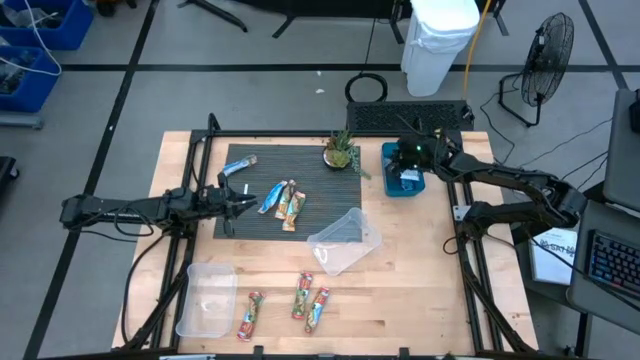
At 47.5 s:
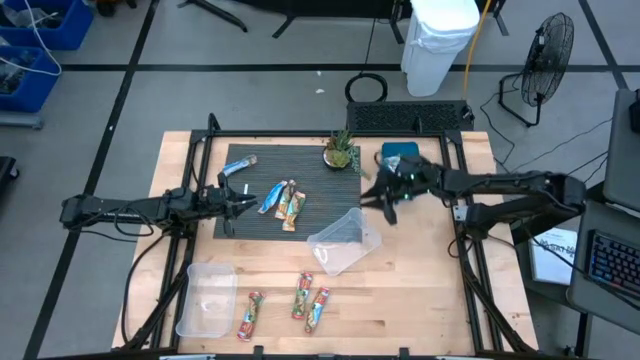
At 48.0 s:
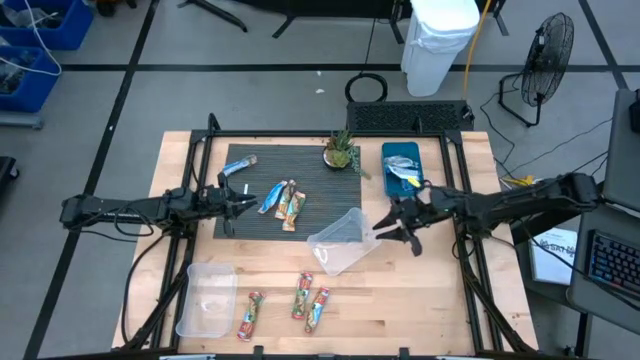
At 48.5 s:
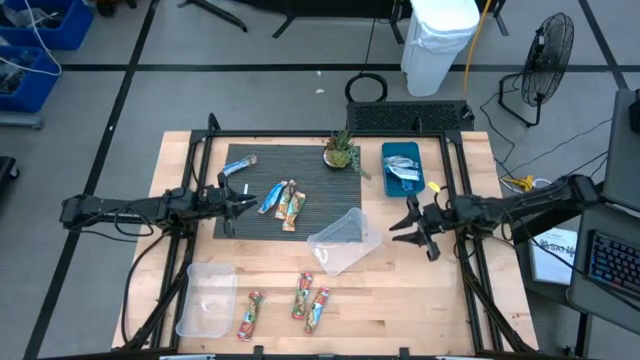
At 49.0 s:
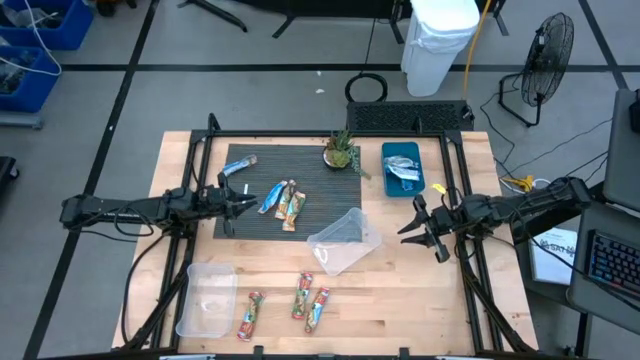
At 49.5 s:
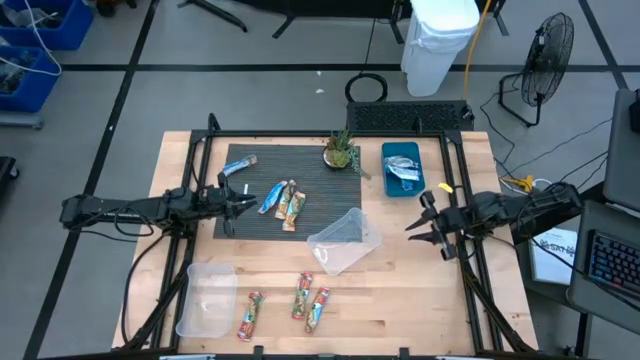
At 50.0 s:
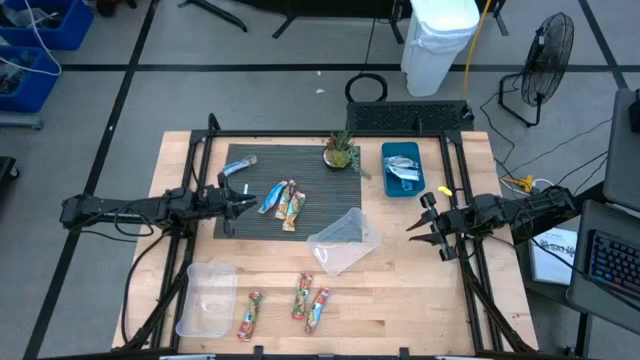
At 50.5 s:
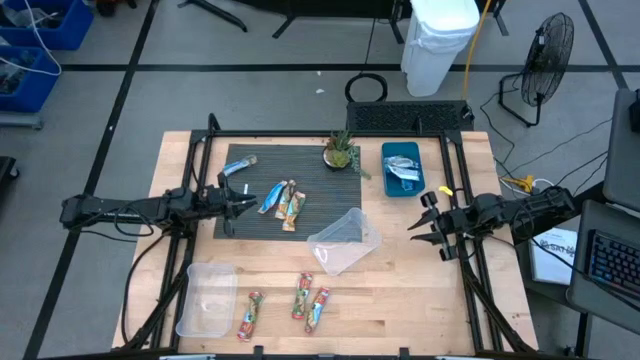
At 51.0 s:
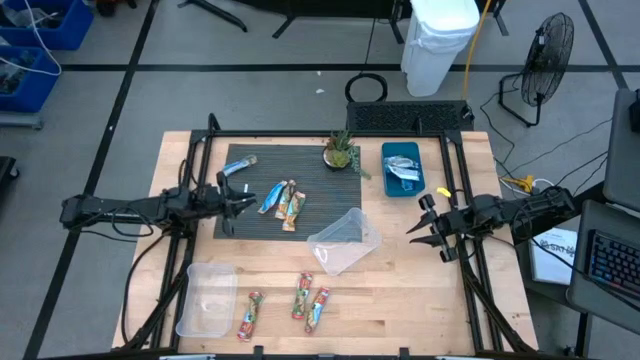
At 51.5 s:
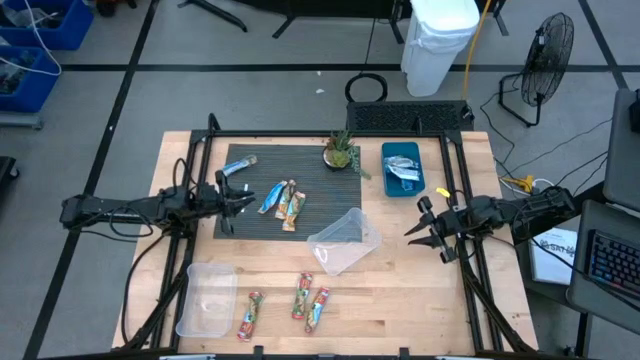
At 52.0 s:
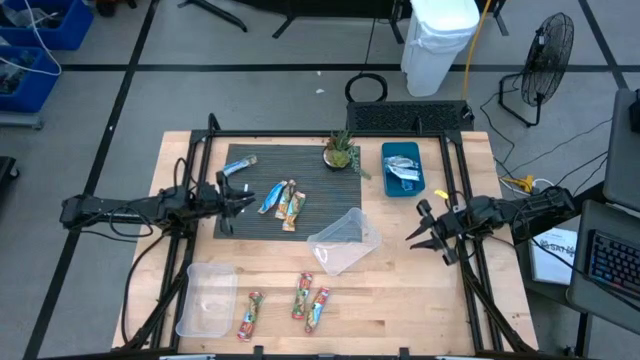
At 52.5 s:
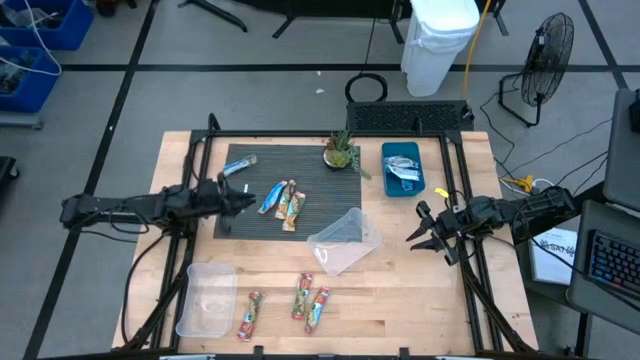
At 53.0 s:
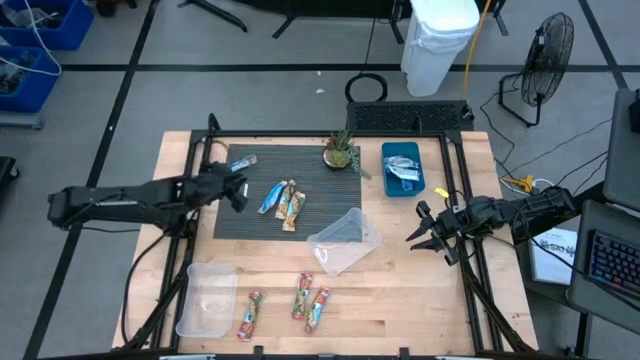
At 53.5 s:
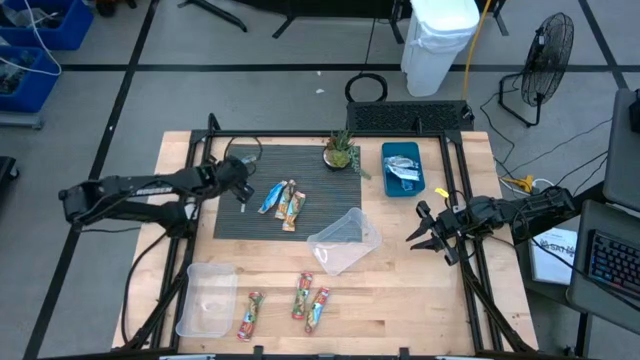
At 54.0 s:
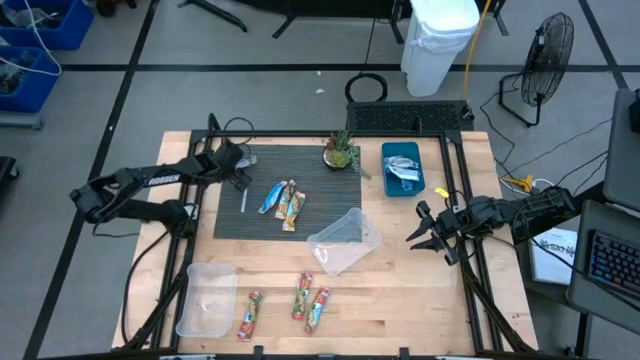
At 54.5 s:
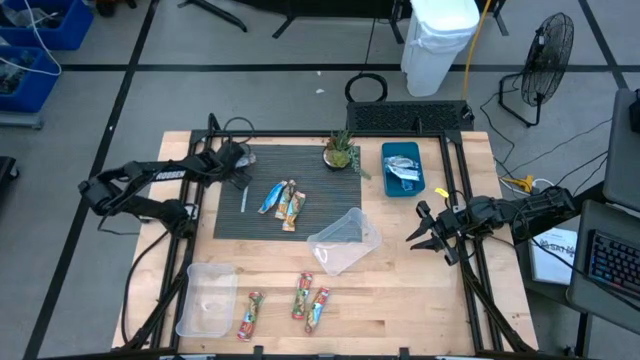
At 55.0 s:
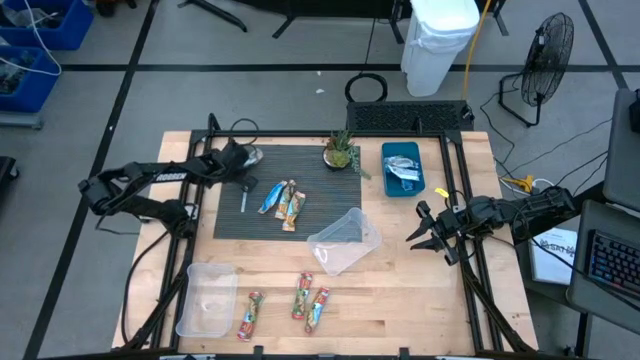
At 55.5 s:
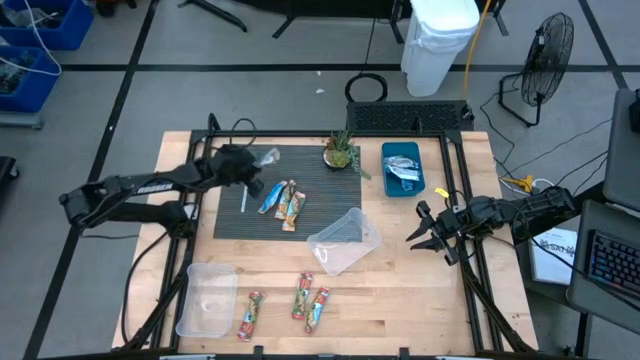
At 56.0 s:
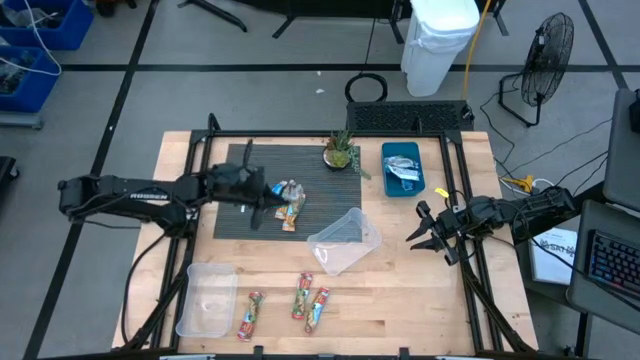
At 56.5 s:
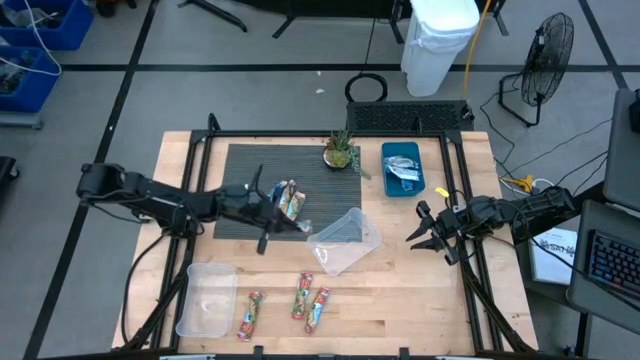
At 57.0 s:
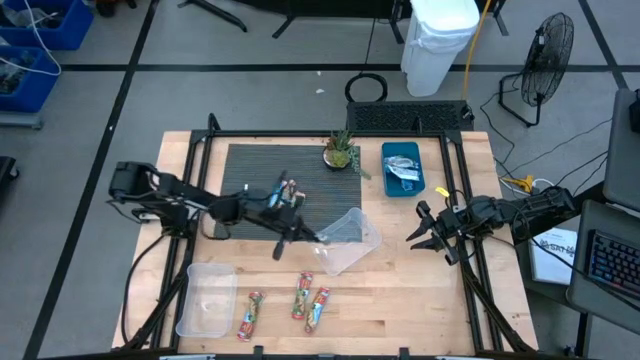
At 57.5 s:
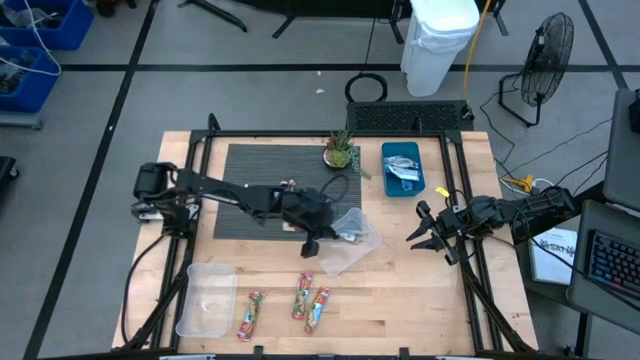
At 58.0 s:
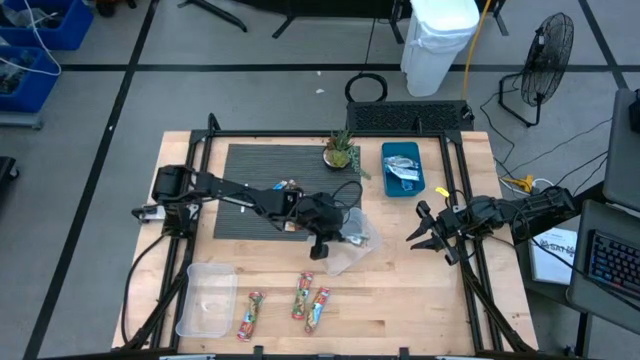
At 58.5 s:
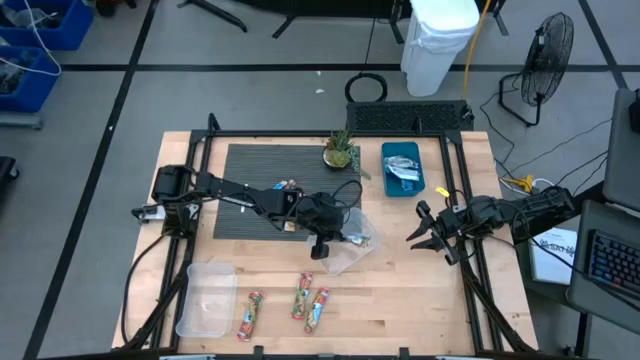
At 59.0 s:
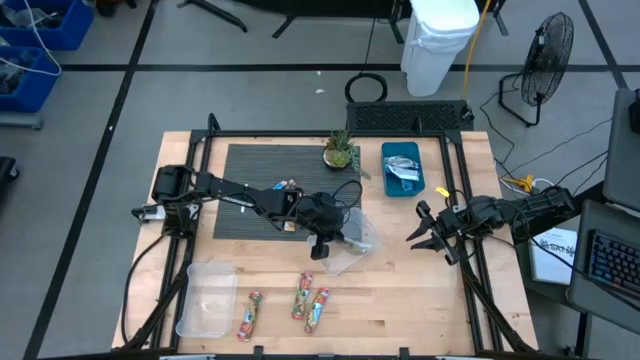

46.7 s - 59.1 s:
Task: Pick and place Granola Bars by type
Put the yellow granola bar into the top transparent bin

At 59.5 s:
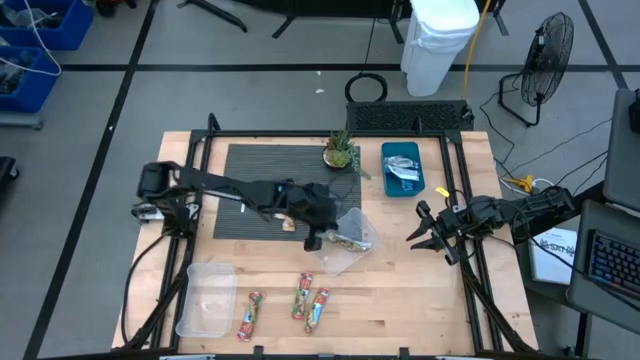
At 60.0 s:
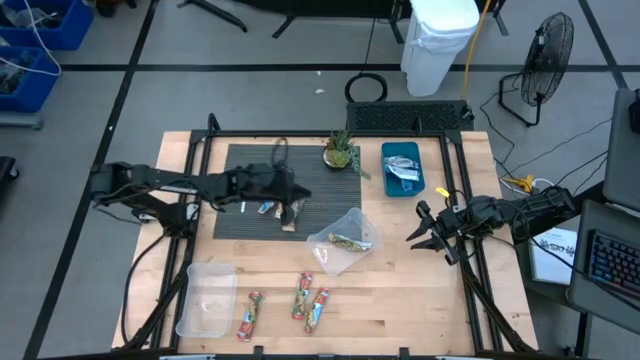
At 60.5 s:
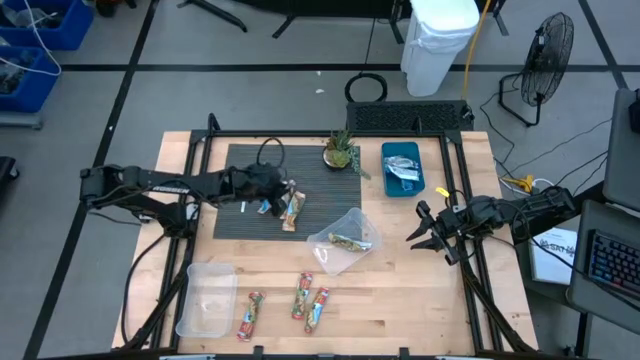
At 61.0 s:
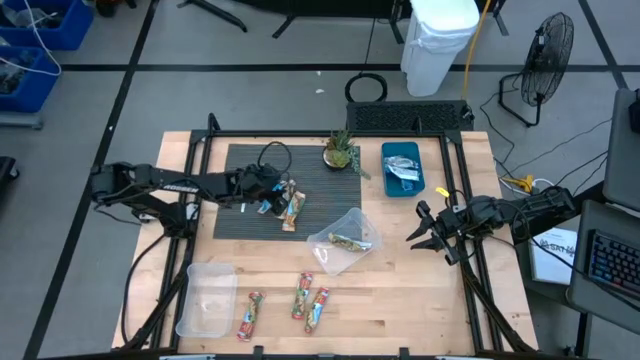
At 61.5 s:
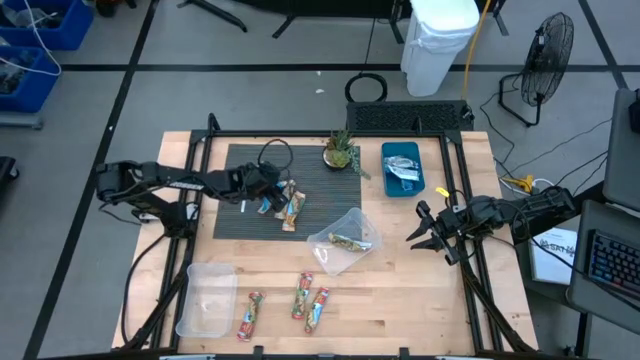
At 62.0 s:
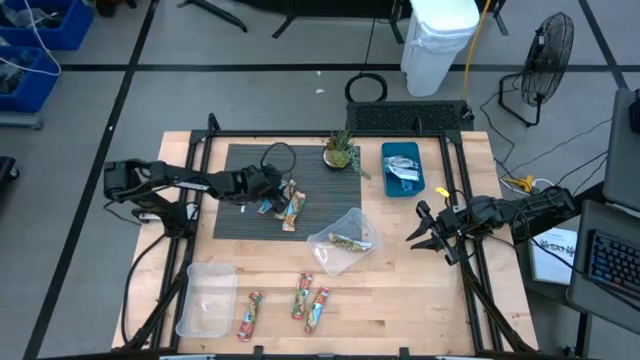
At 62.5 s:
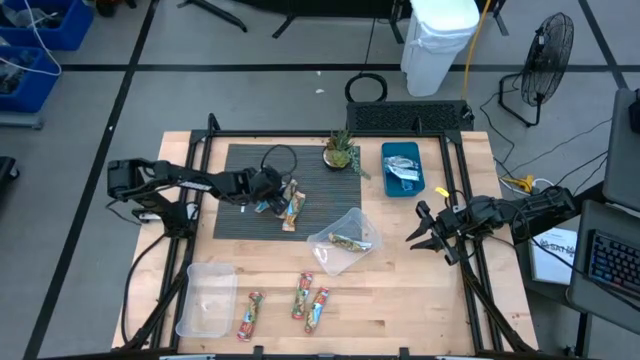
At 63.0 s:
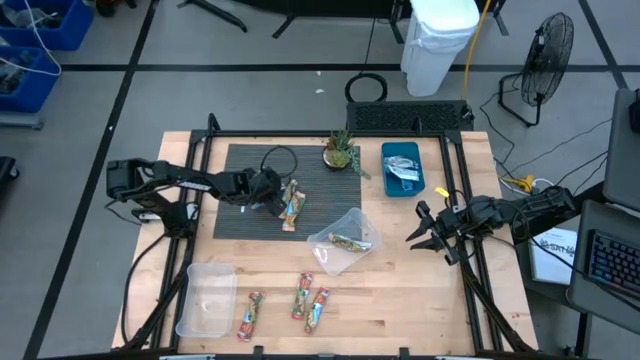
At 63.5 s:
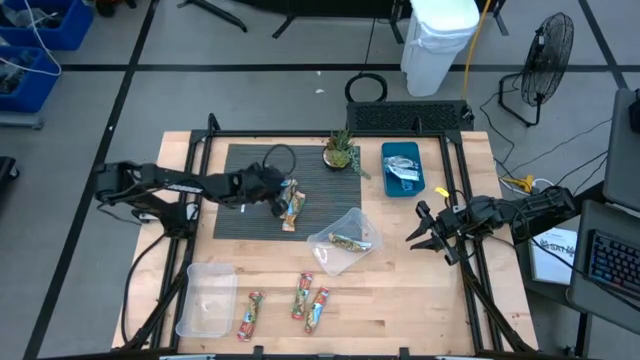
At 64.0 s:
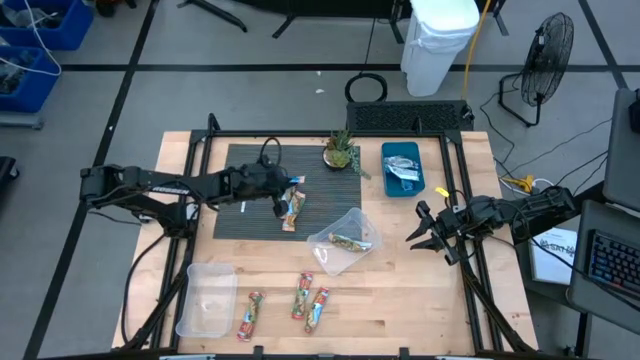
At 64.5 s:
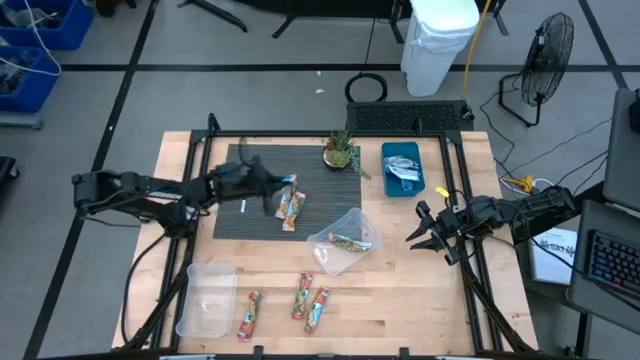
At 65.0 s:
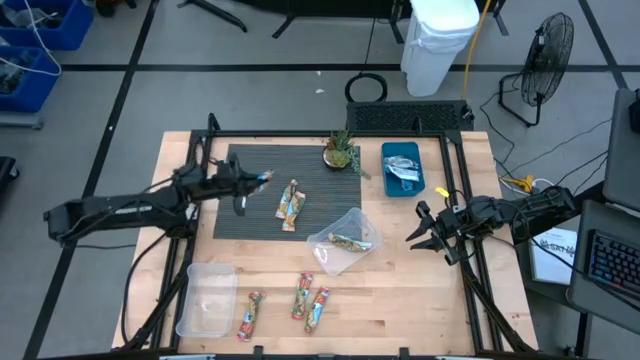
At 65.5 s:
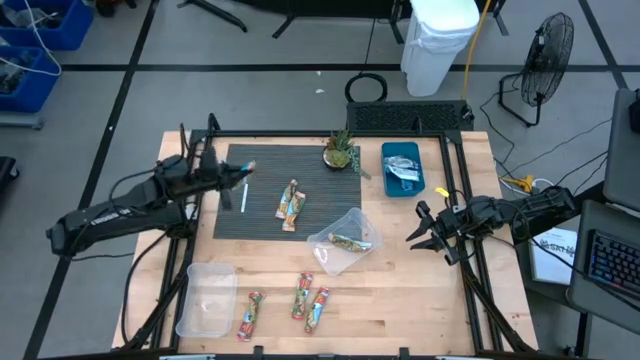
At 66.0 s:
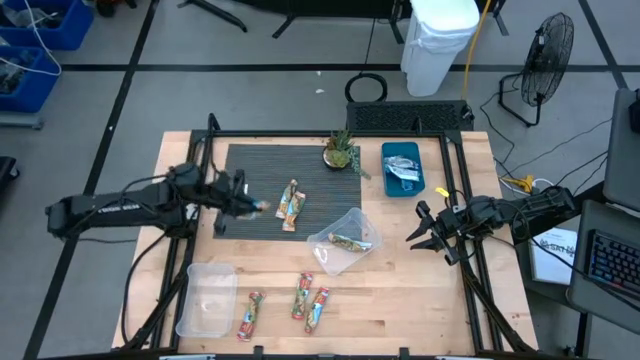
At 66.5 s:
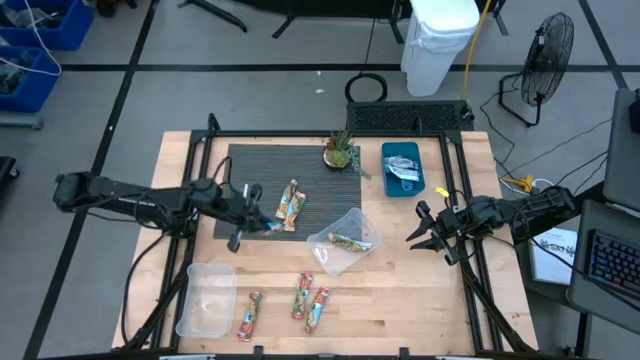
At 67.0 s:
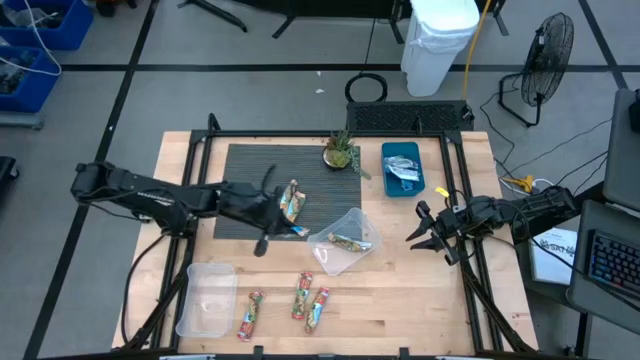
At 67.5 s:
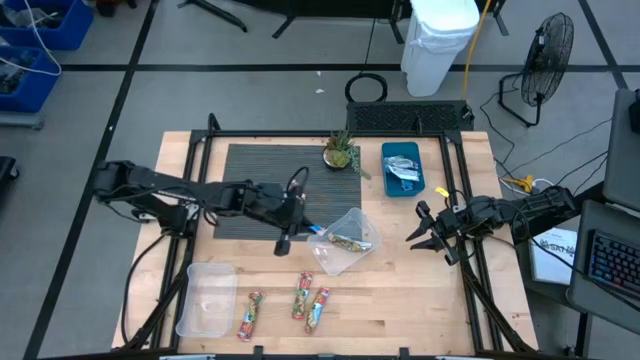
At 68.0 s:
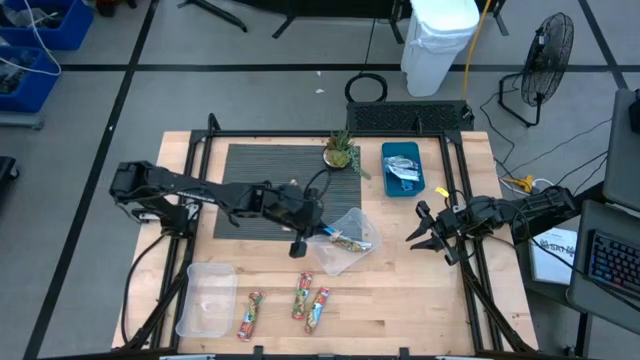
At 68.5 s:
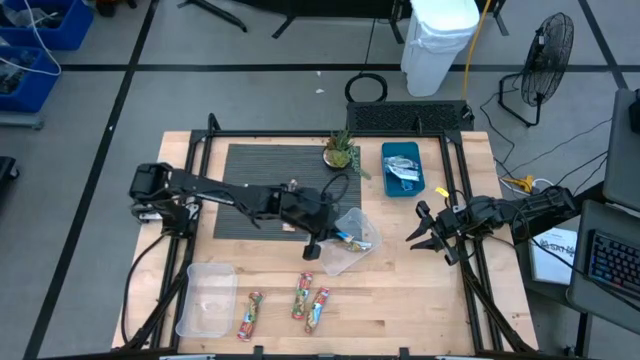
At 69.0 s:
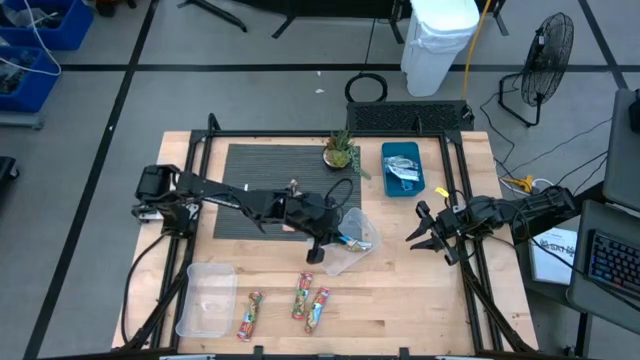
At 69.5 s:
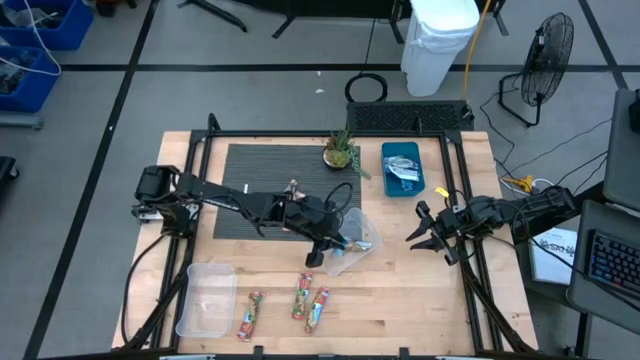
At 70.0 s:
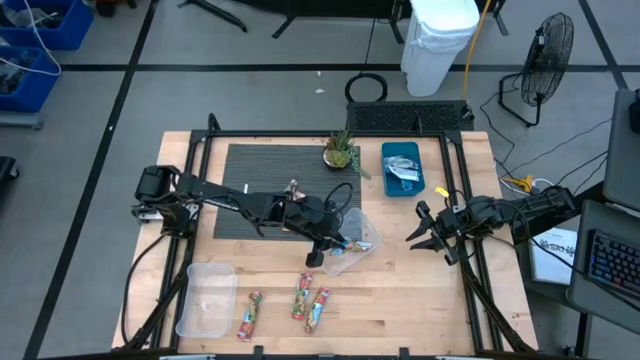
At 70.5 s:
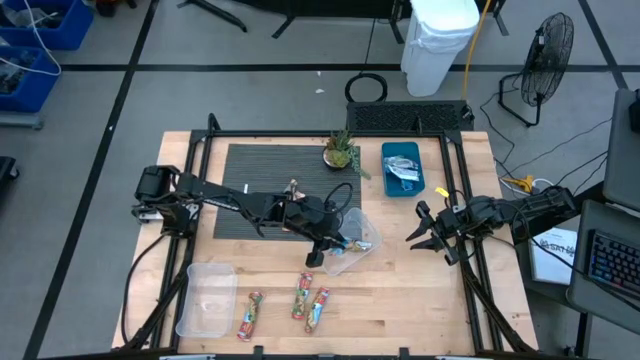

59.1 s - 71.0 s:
Put the left yellow granola bar into the top transparent bin
